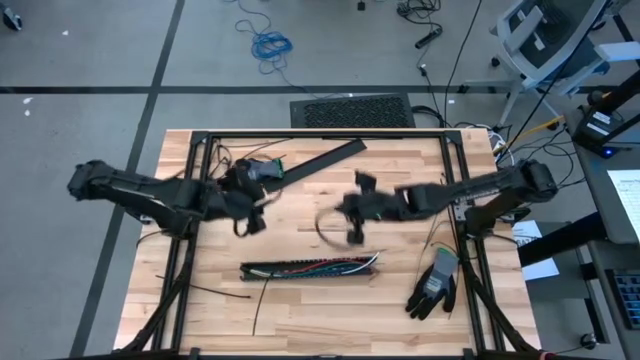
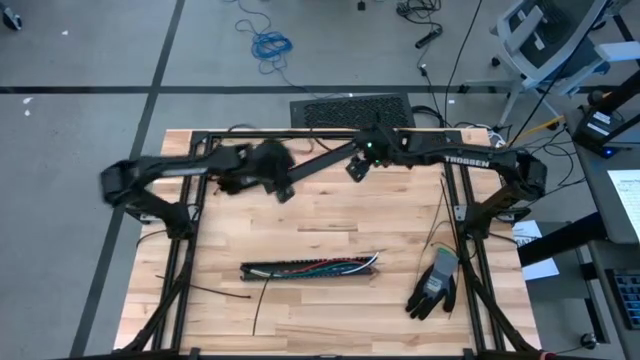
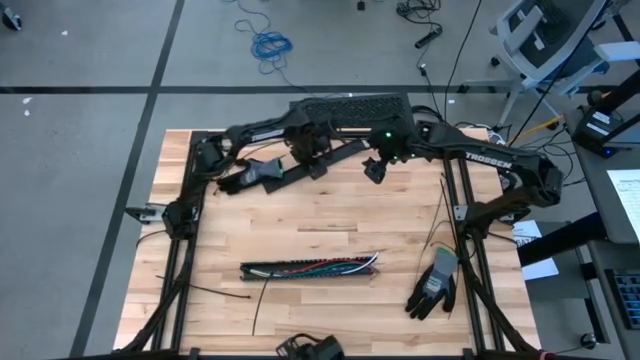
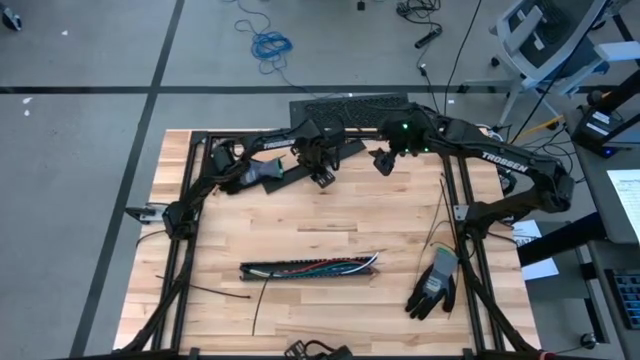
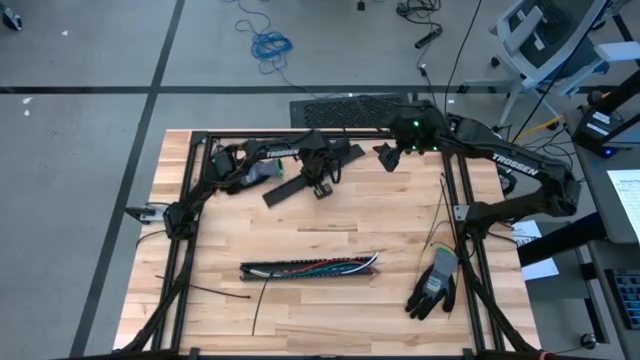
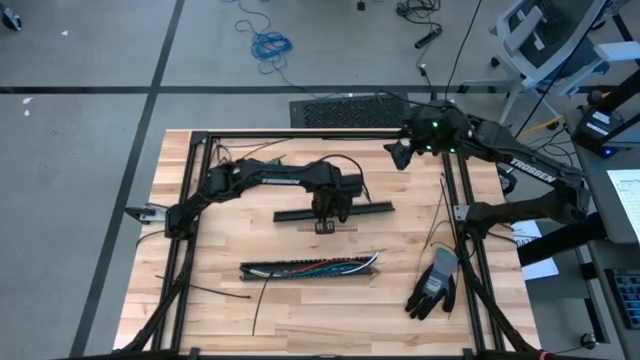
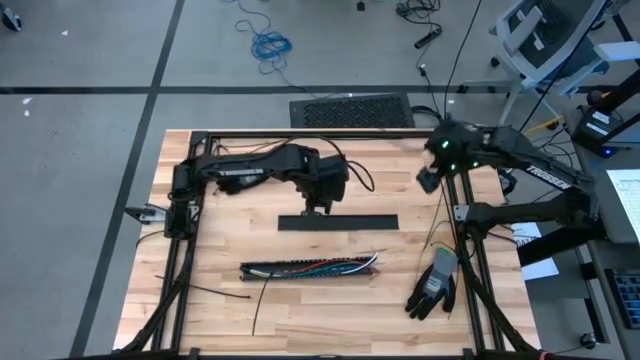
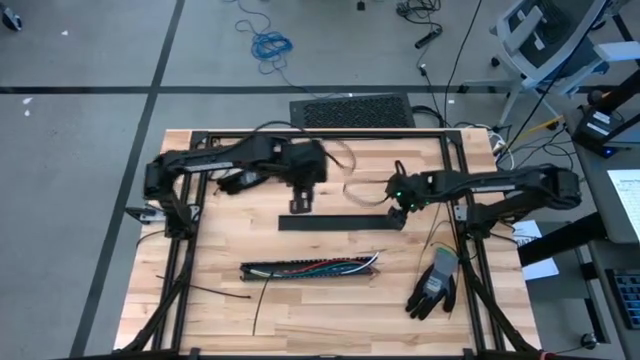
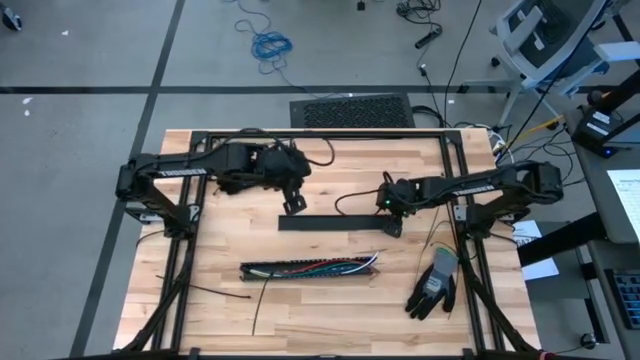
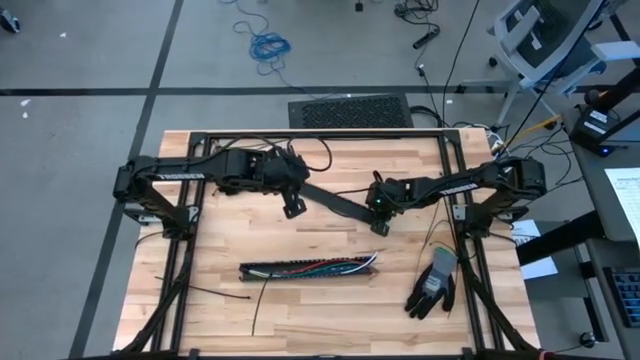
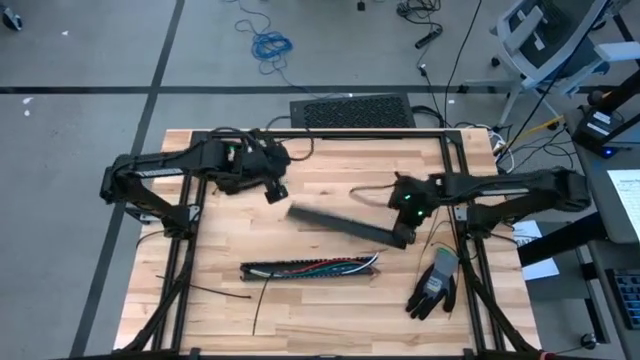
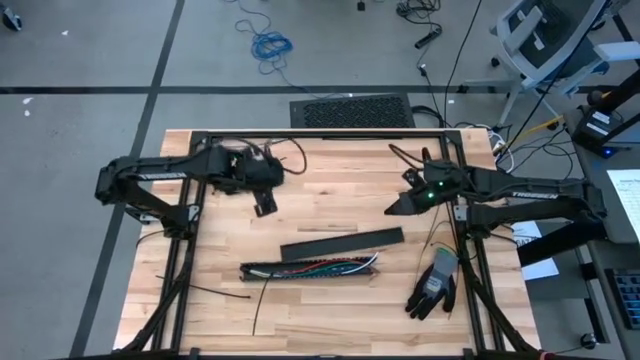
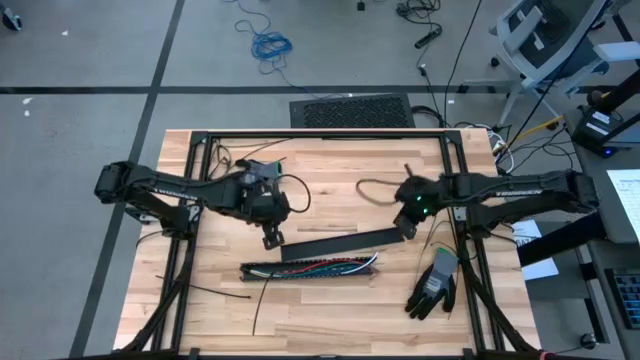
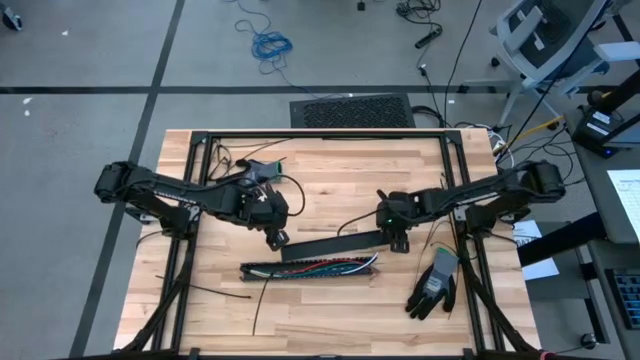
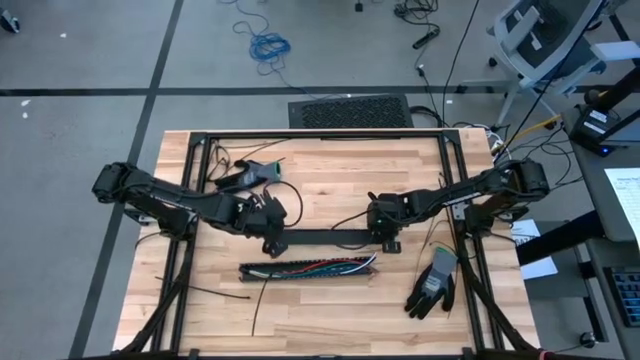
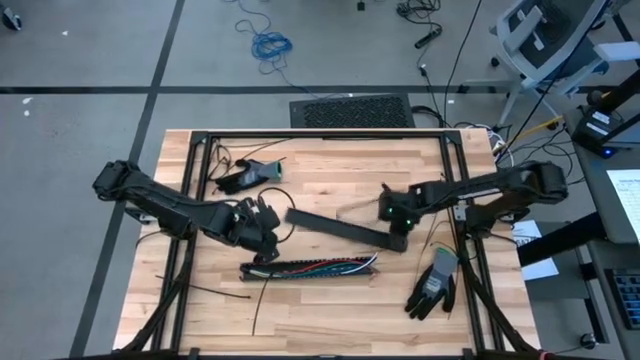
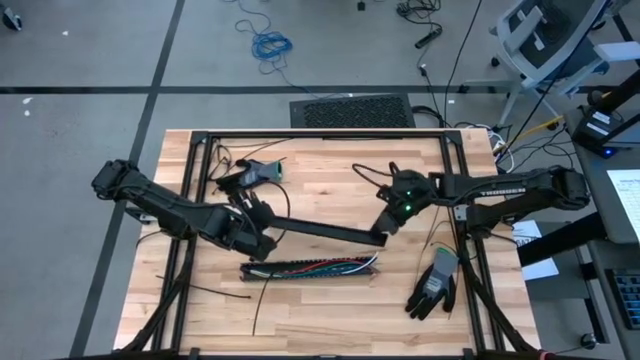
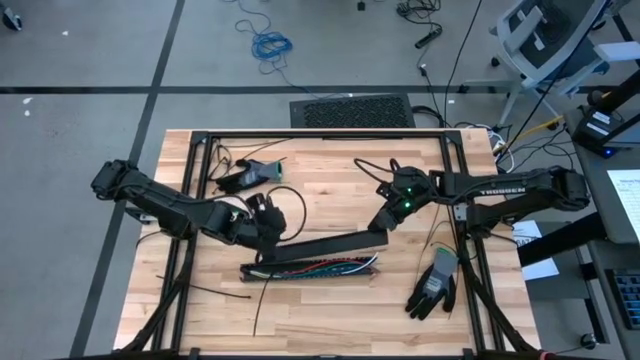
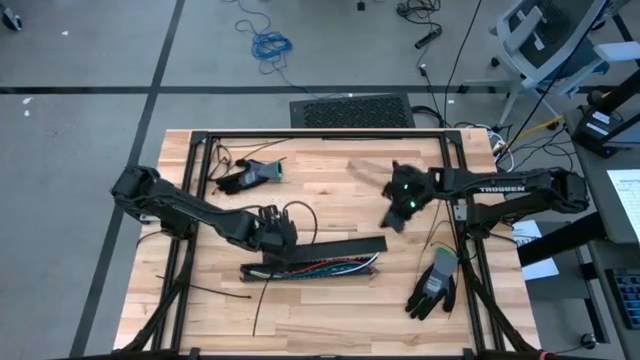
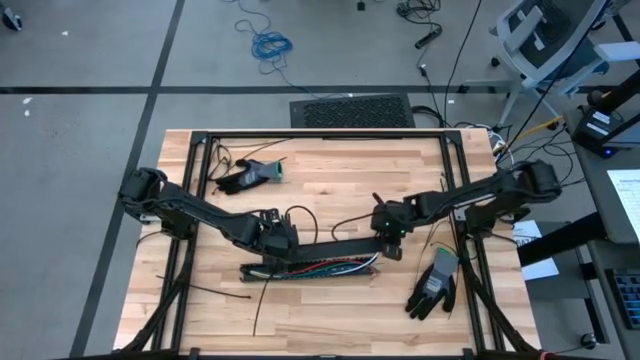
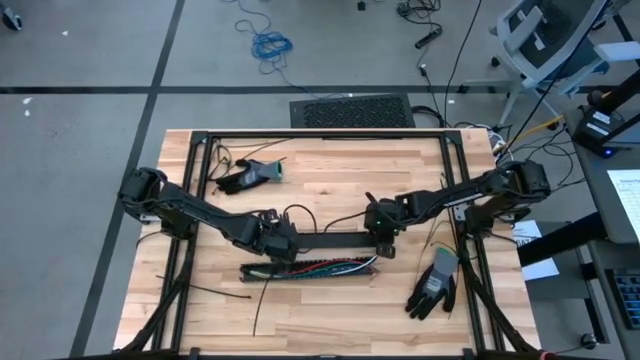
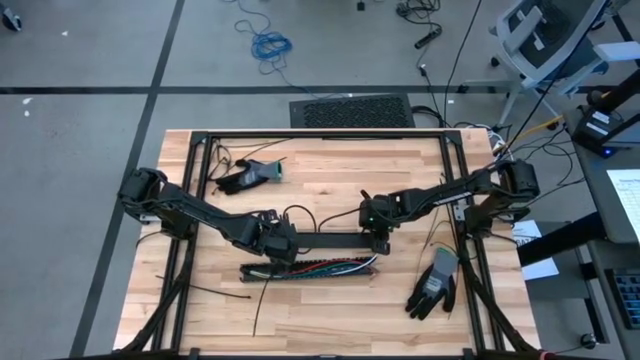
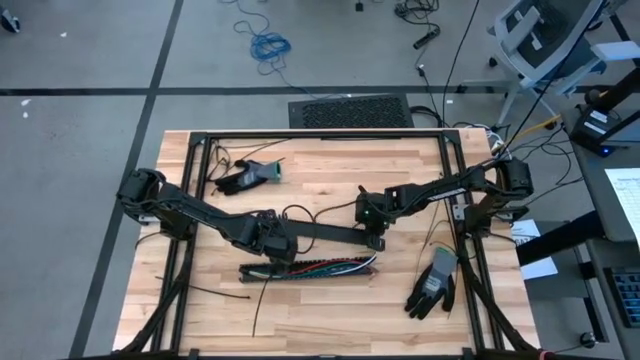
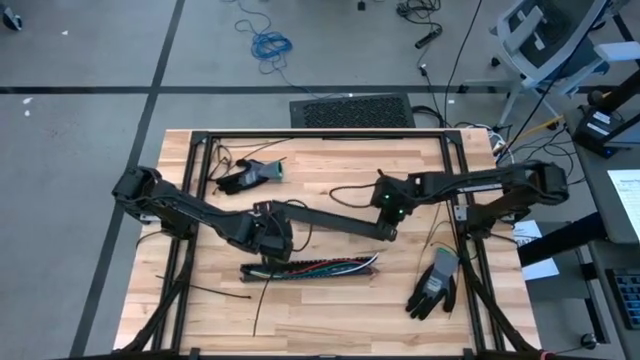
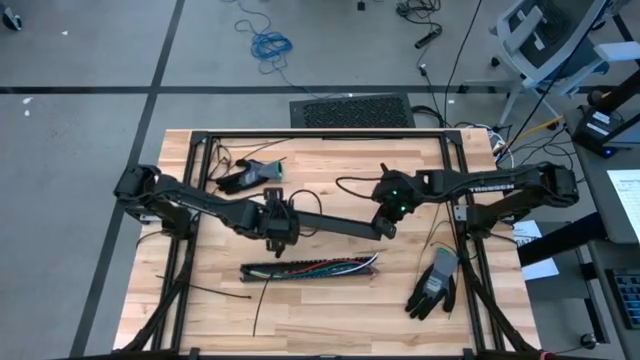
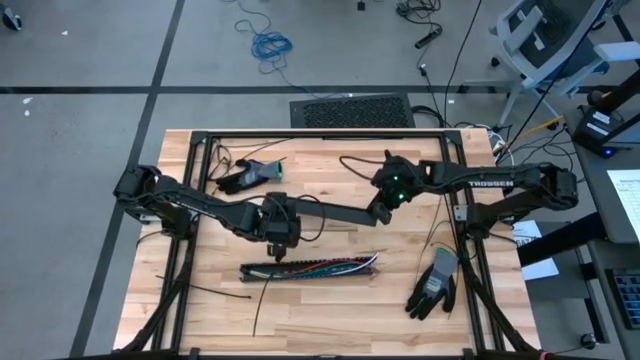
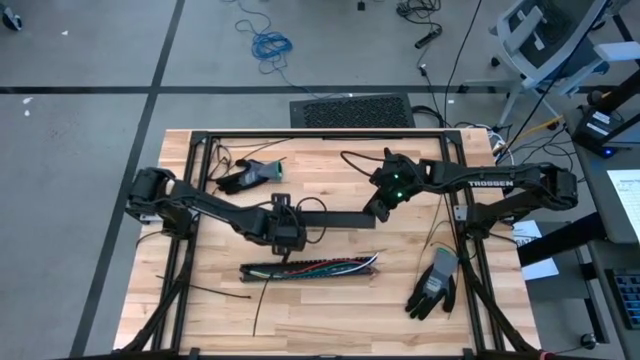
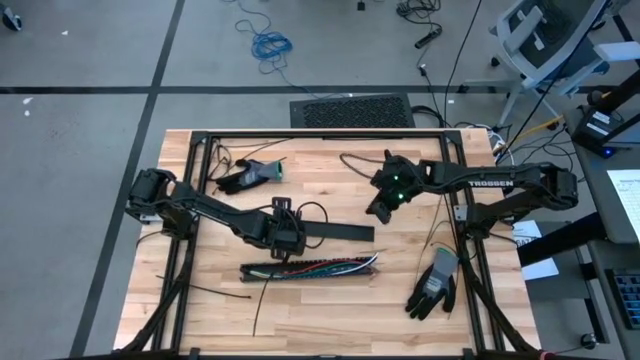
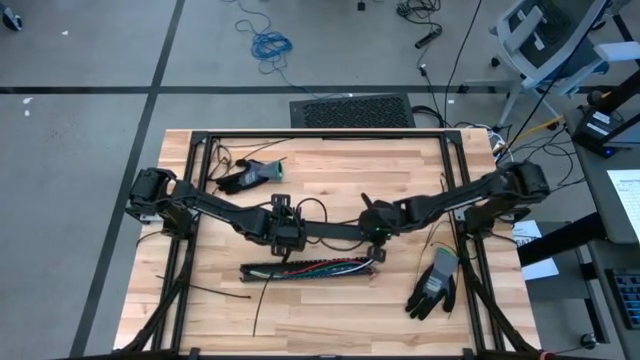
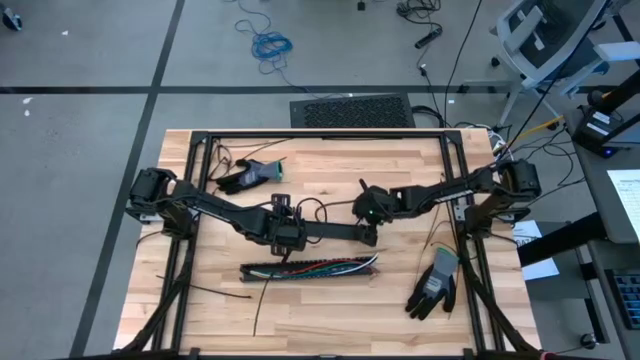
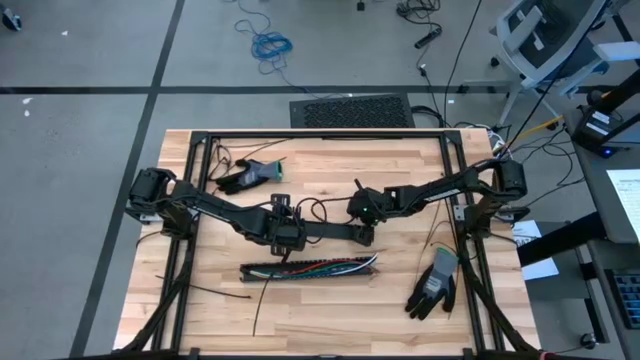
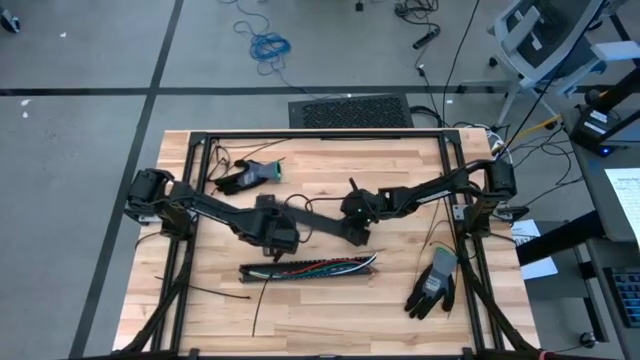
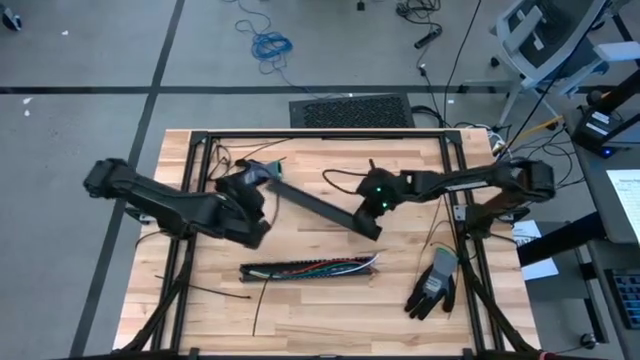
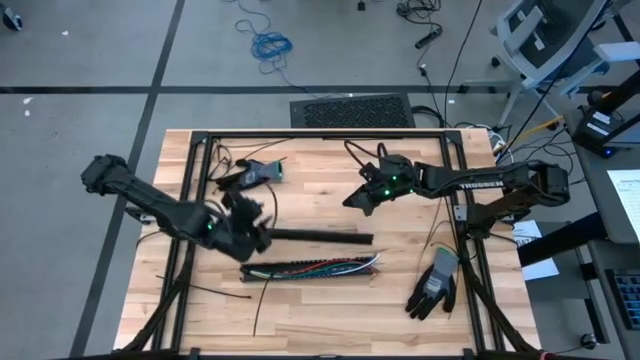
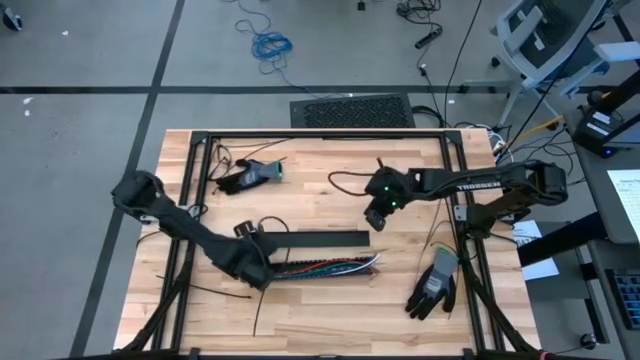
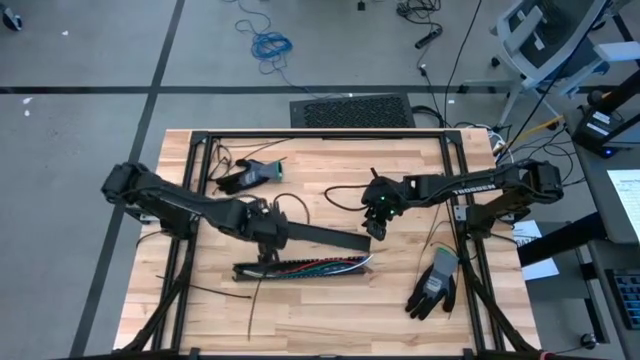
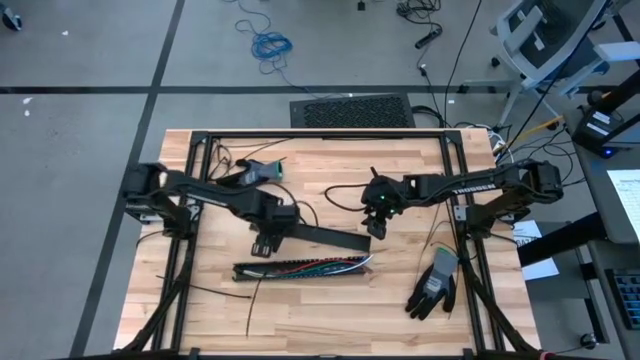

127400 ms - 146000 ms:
Task: Ziptie cables
Close the black cable duct

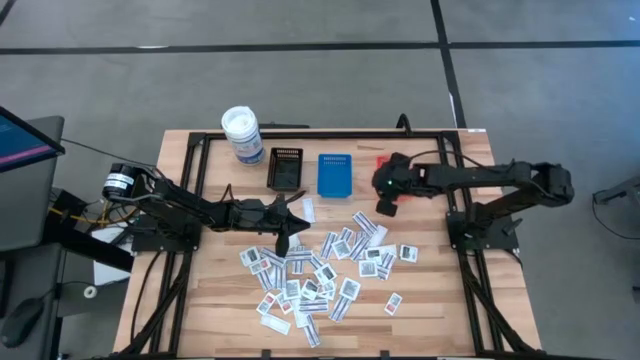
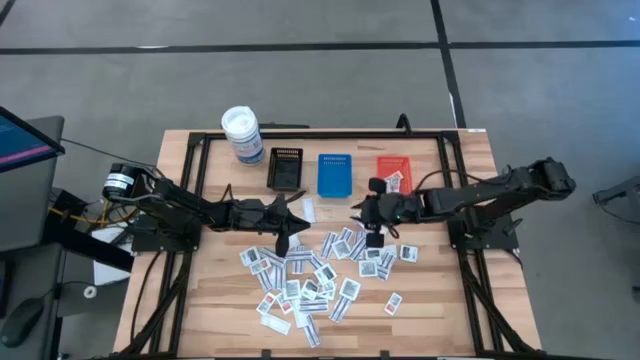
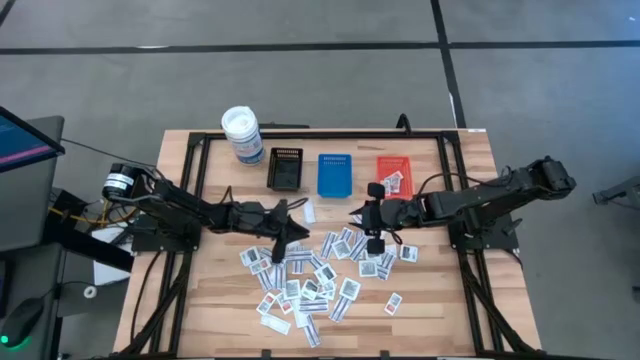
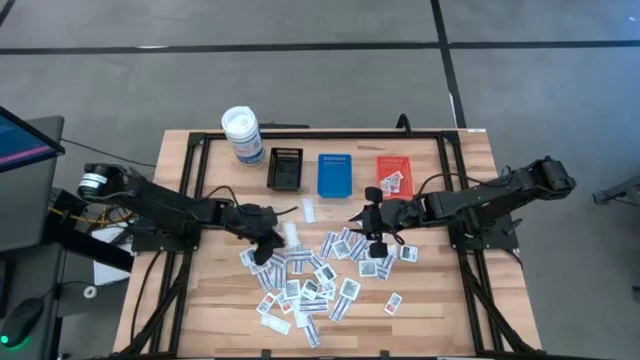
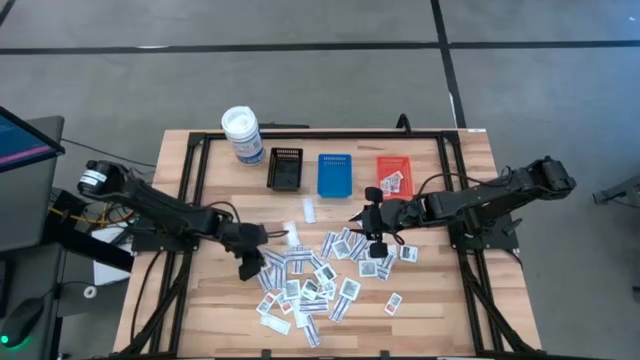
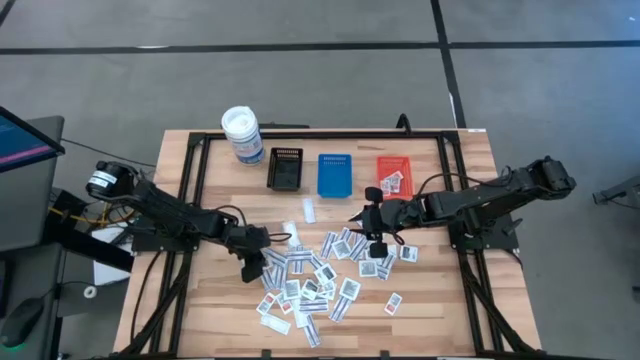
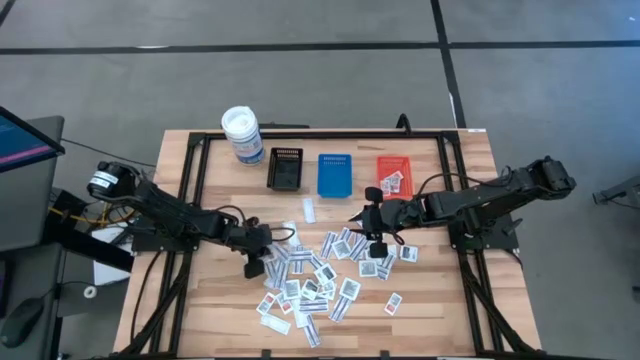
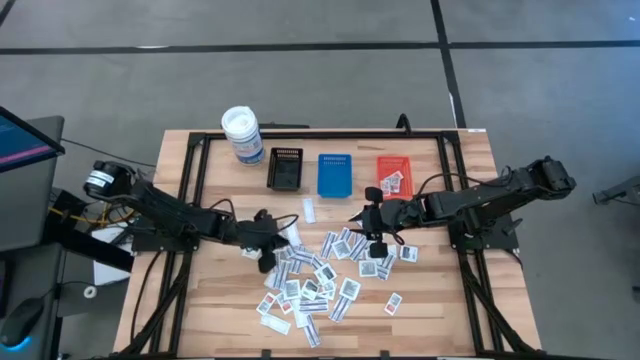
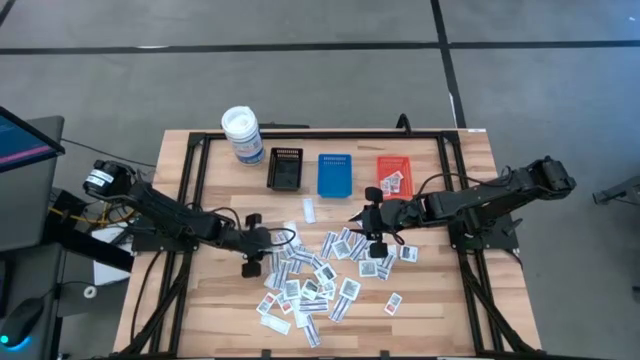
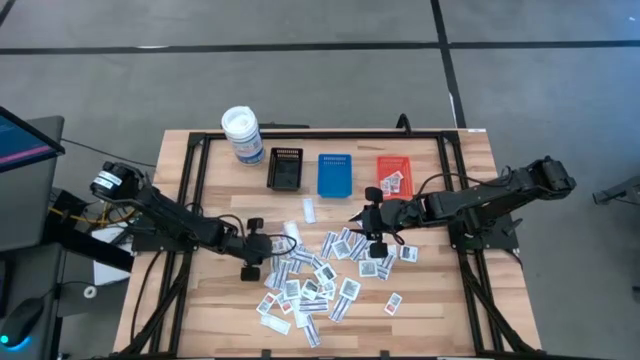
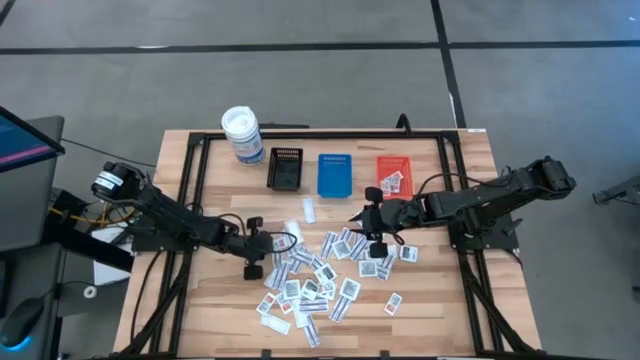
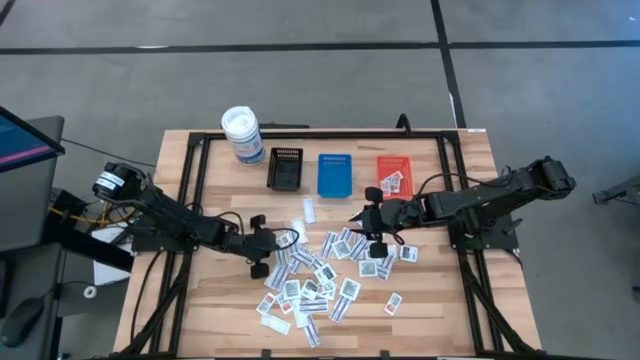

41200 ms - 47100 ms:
Task: Pick & Place First Aid Supplies
Put the orange ointment pack into the orange bin
